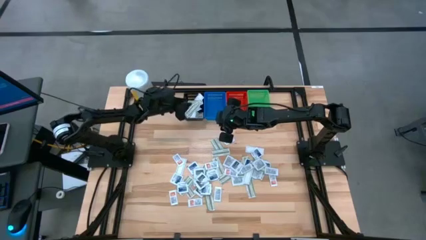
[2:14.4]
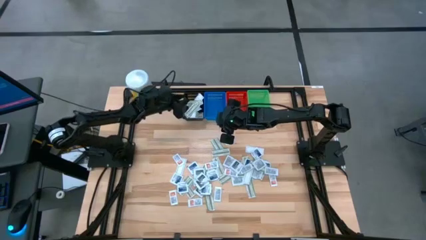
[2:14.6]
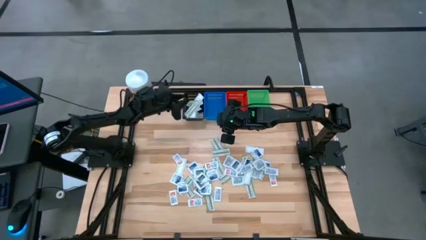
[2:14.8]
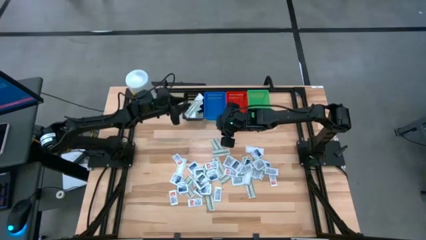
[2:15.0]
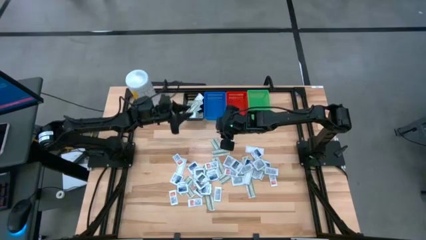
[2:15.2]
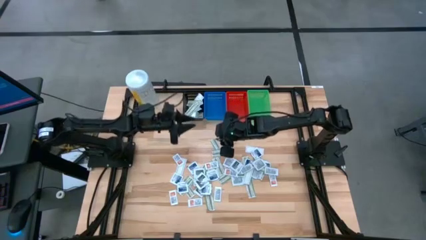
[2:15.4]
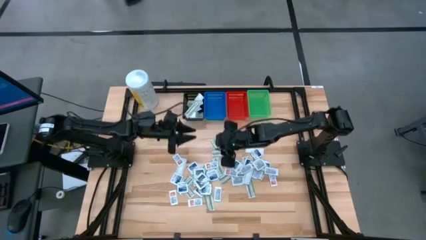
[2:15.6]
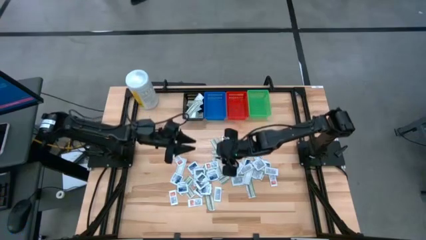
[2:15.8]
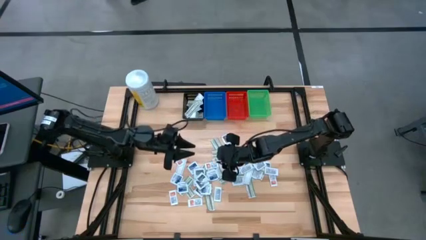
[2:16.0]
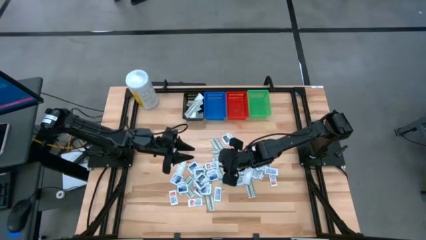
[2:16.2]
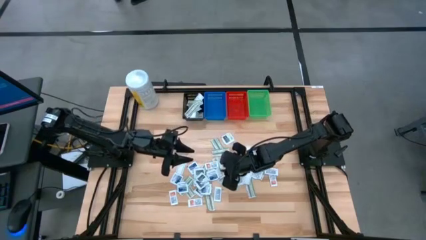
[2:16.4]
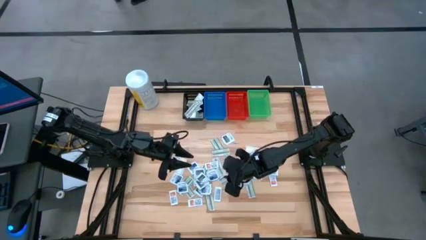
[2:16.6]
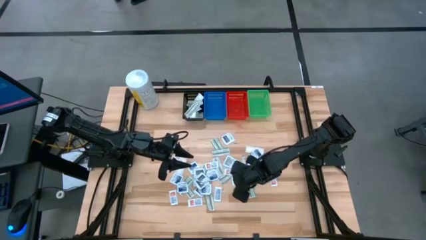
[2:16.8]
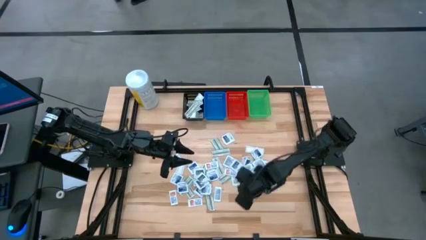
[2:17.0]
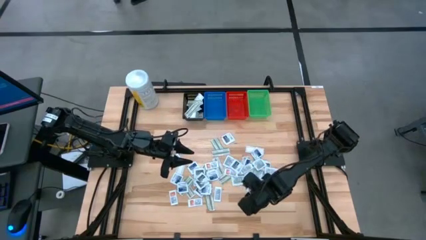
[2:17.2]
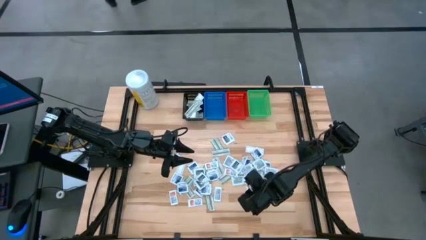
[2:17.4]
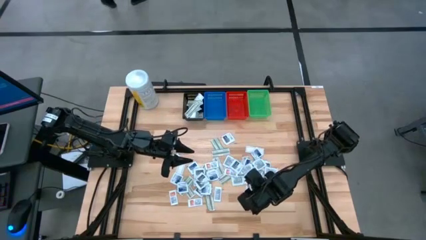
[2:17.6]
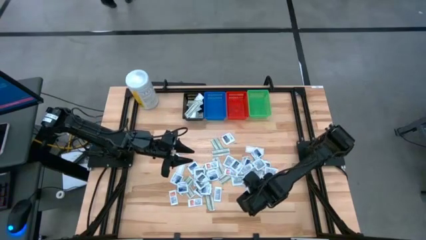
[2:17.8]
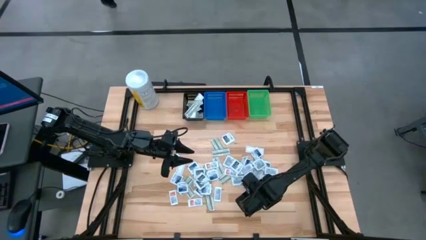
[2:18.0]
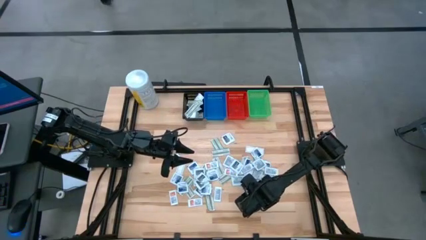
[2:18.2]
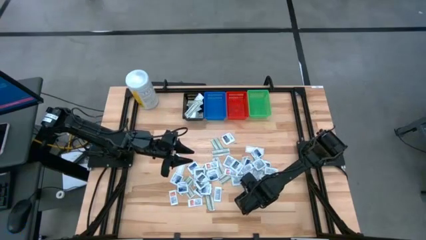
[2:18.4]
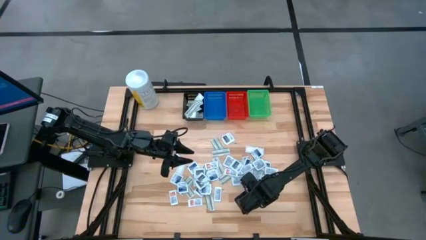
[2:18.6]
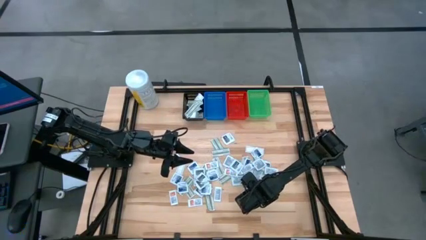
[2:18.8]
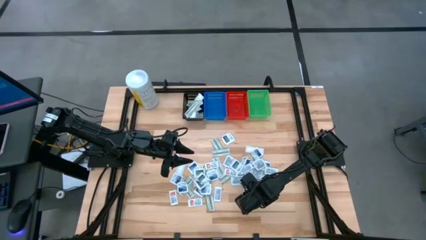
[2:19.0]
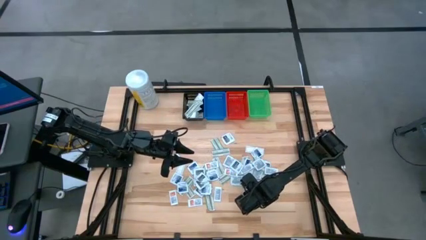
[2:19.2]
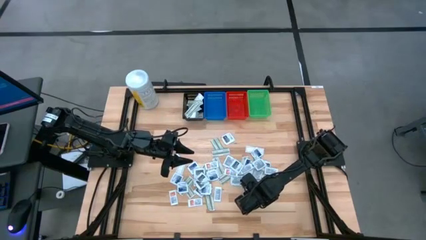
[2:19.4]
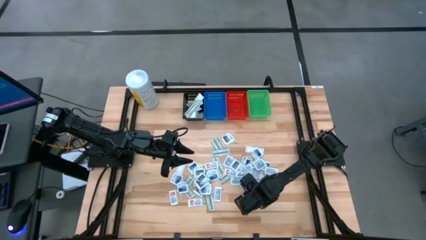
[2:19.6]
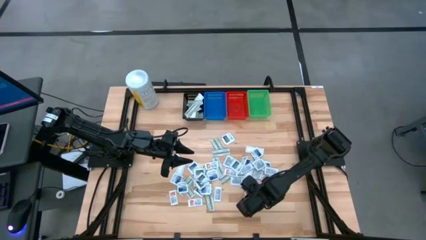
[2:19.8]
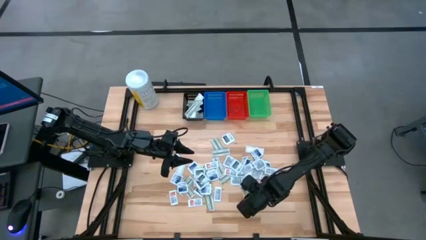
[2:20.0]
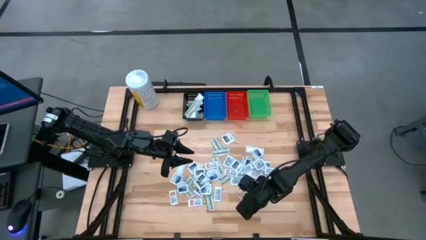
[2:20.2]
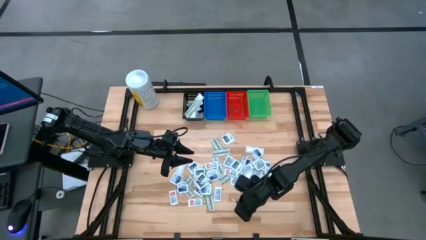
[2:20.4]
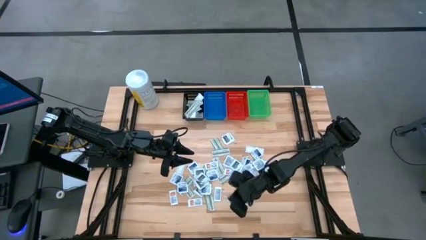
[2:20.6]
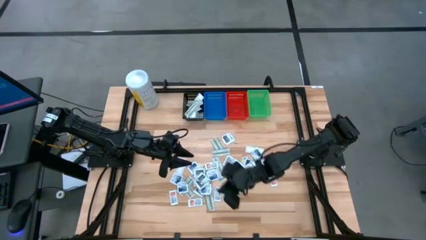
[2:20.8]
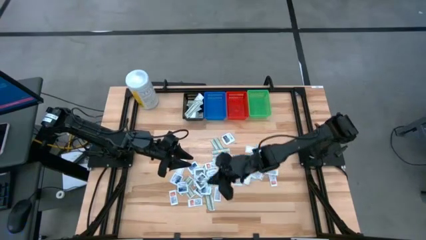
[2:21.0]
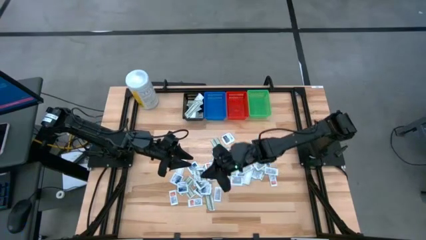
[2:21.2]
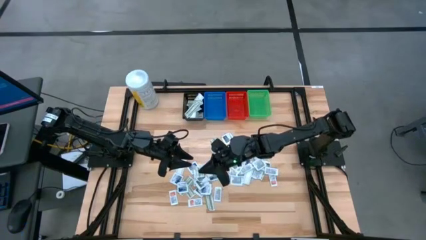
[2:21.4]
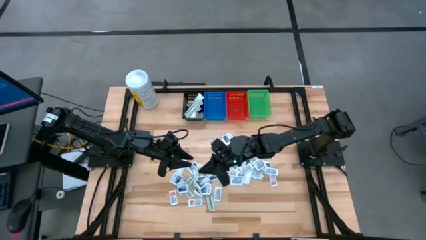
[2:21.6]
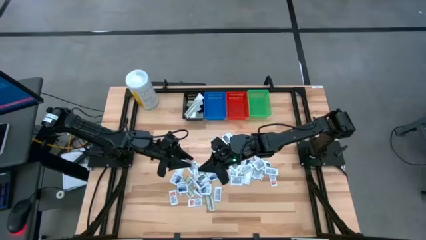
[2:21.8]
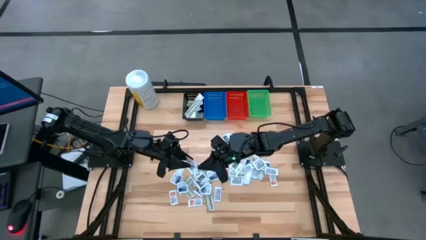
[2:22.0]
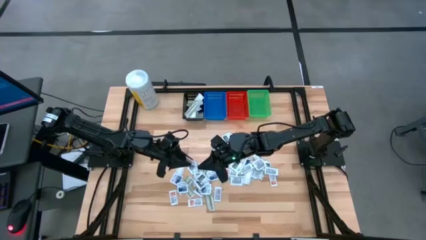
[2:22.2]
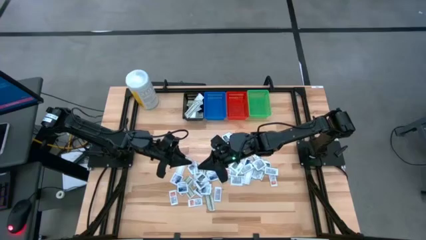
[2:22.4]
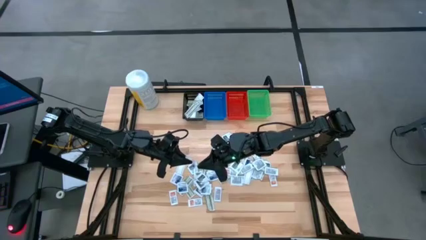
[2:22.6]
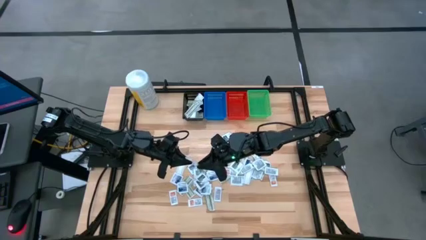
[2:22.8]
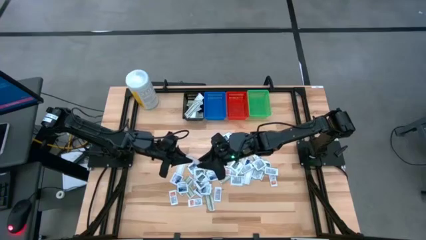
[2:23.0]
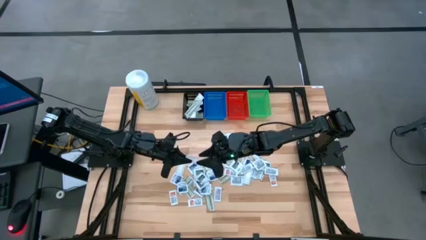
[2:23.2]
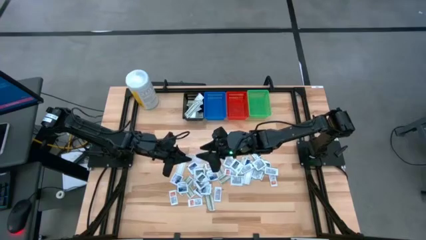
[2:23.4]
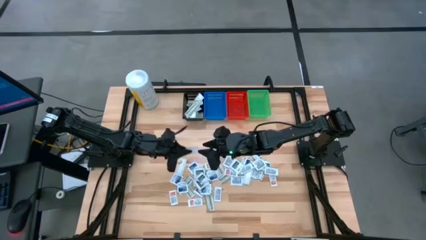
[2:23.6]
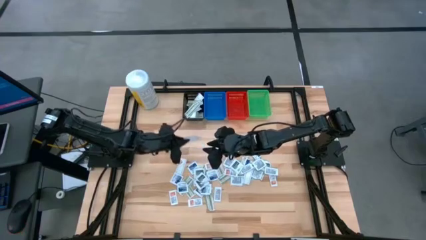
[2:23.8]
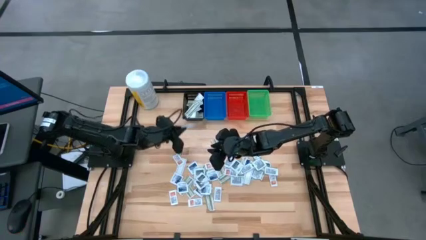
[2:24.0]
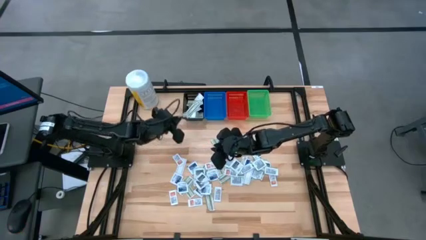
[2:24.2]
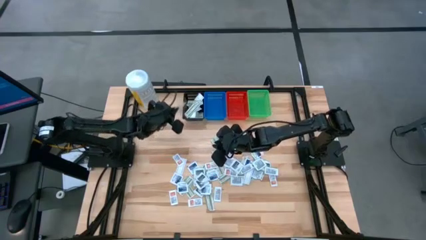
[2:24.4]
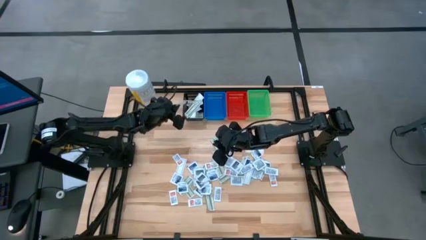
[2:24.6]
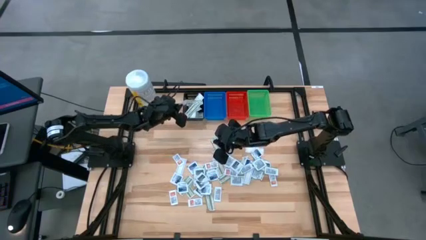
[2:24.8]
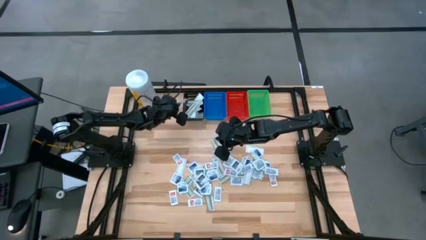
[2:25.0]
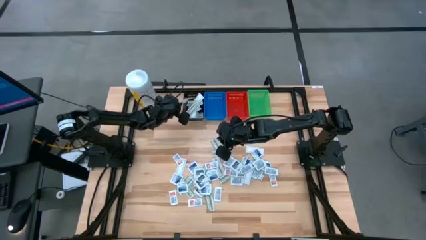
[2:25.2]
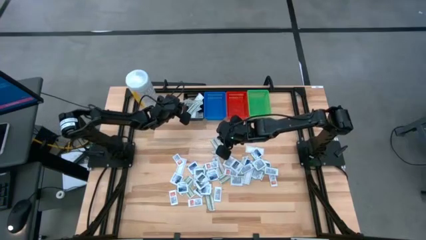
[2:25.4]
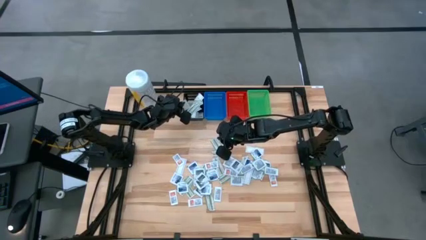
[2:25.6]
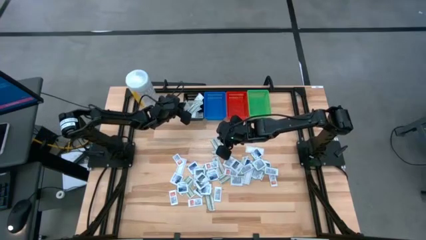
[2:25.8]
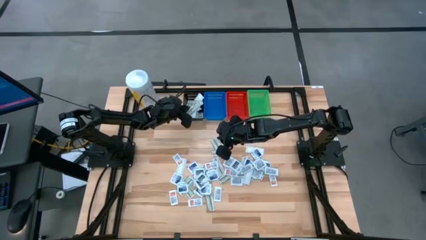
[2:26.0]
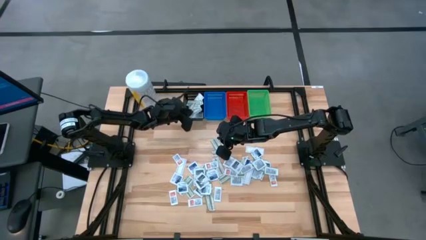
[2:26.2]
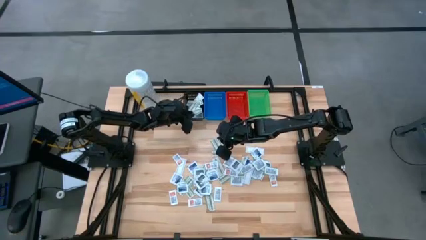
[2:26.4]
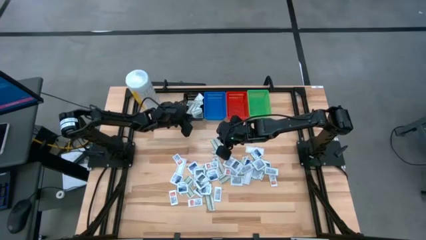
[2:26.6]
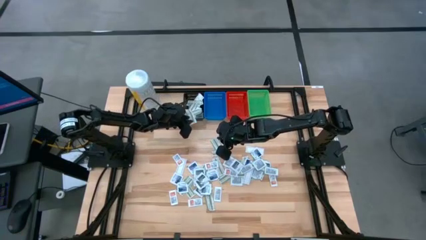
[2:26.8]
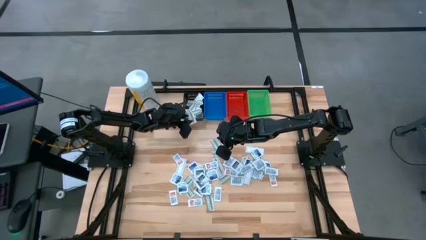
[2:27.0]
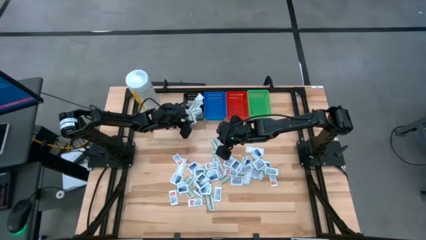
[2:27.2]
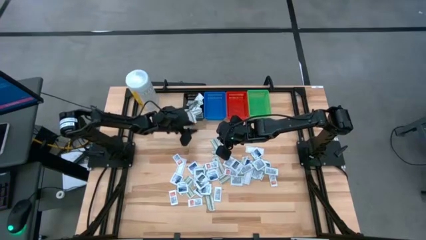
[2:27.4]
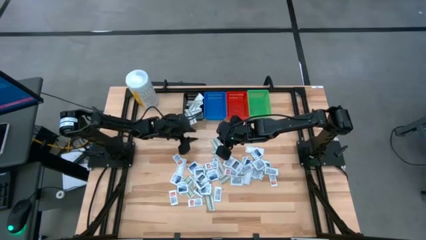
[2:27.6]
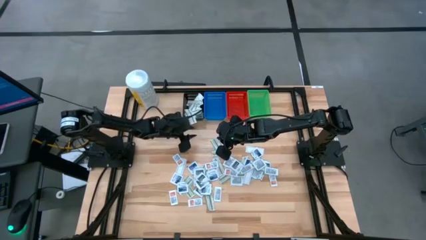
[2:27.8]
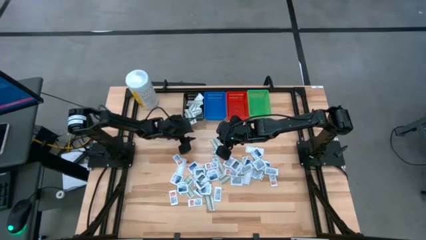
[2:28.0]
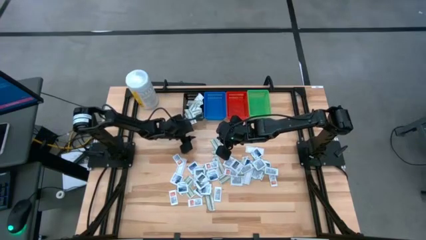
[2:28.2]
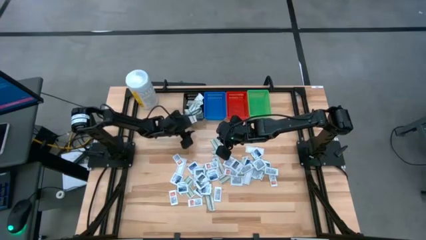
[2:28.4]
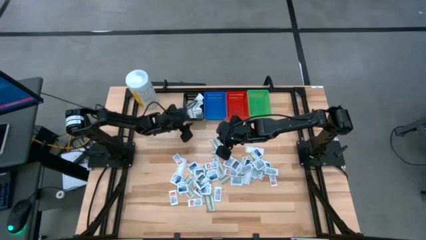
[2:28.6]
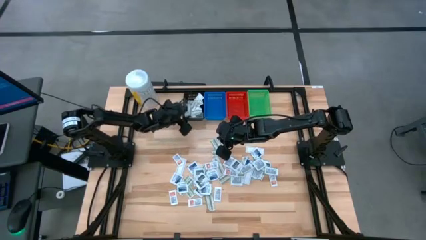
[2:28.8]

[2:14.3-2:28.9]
Task: Pick & Place First Aid Supplies
Put the green bandage pack in the black bin
